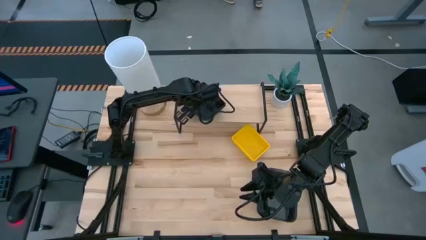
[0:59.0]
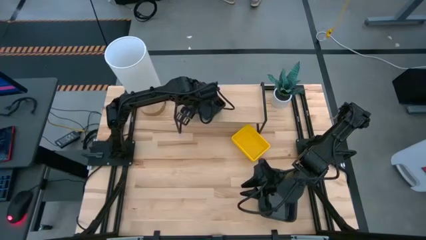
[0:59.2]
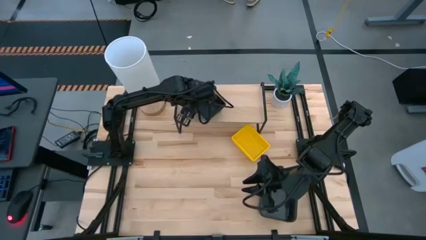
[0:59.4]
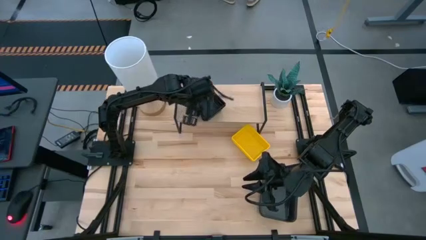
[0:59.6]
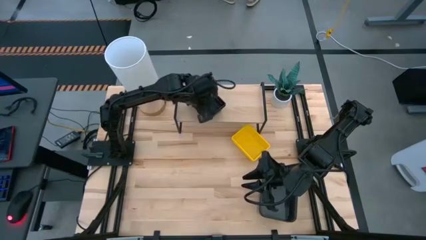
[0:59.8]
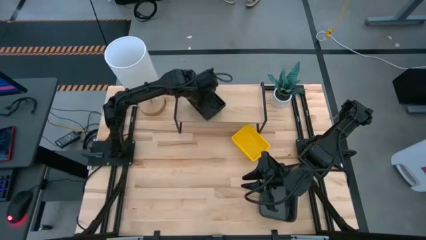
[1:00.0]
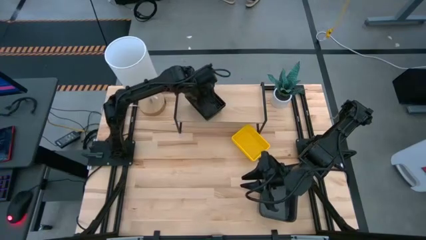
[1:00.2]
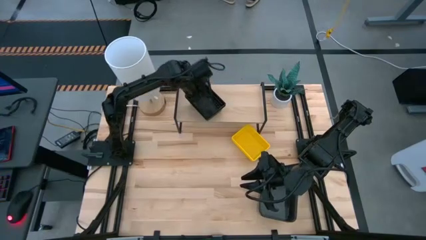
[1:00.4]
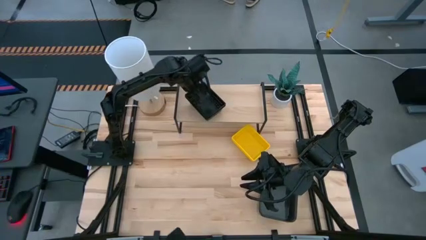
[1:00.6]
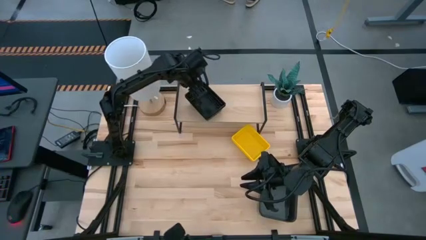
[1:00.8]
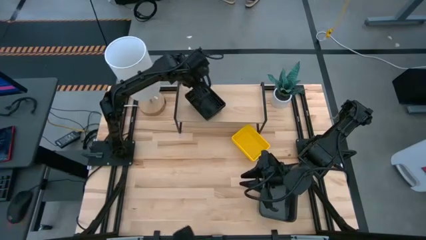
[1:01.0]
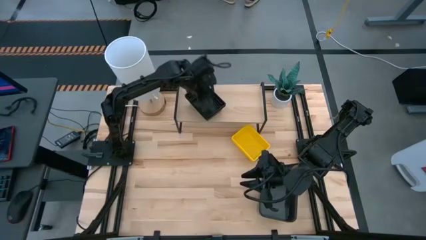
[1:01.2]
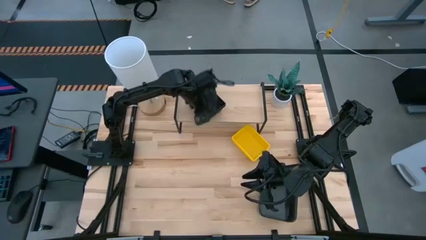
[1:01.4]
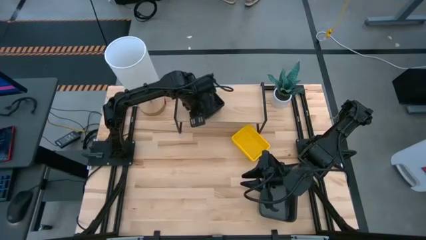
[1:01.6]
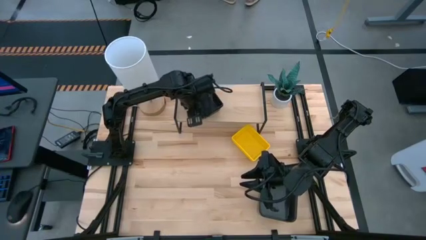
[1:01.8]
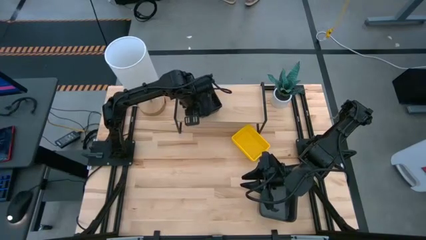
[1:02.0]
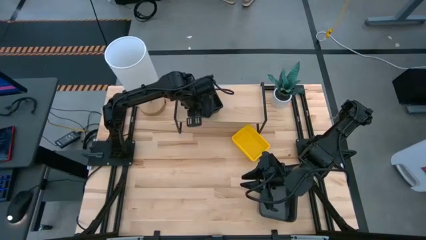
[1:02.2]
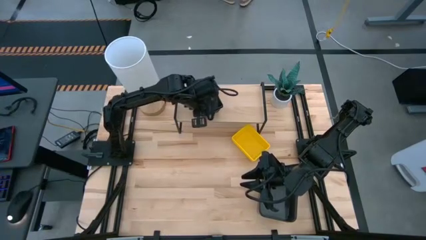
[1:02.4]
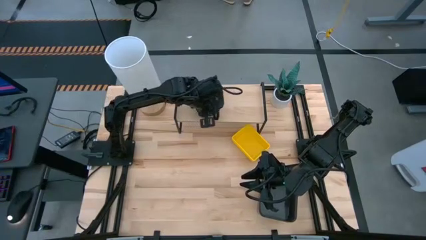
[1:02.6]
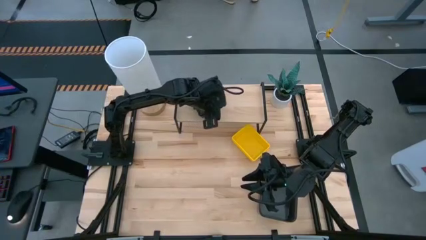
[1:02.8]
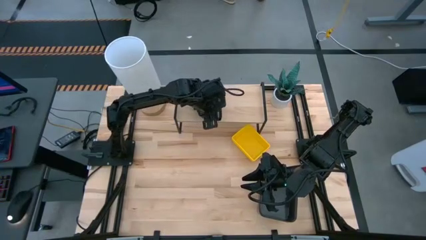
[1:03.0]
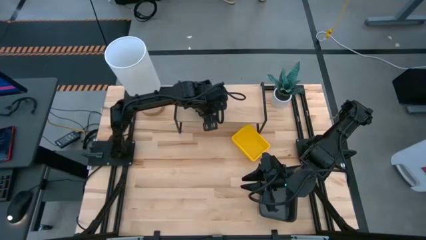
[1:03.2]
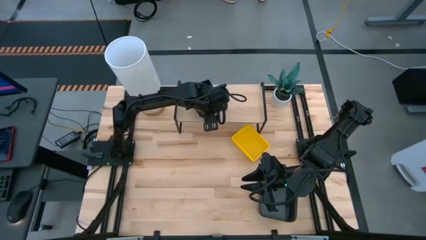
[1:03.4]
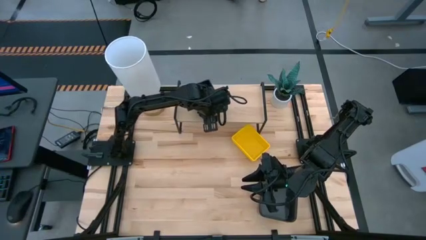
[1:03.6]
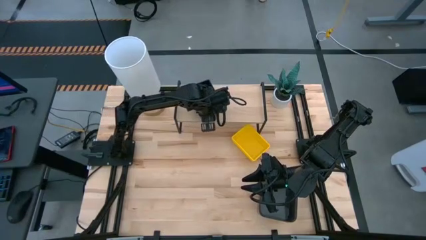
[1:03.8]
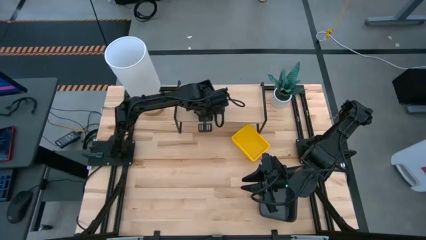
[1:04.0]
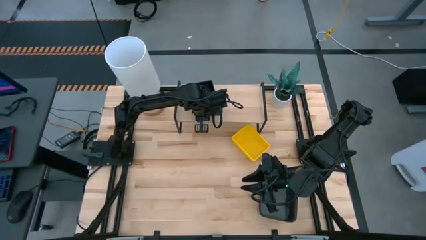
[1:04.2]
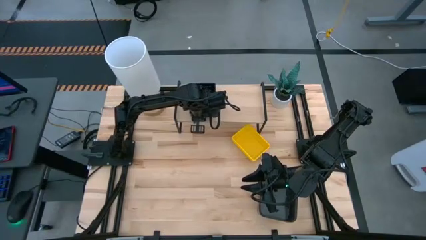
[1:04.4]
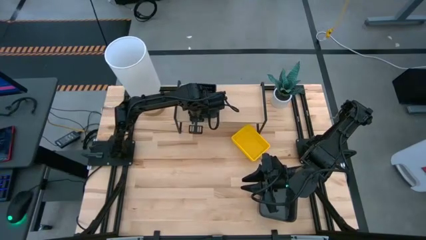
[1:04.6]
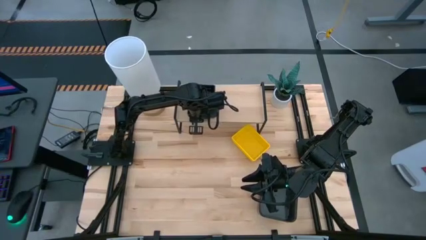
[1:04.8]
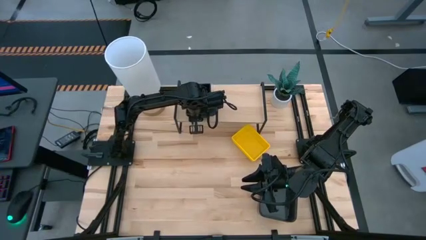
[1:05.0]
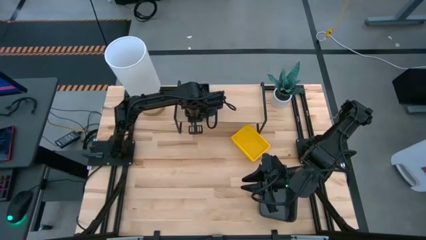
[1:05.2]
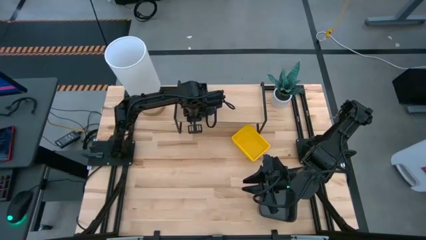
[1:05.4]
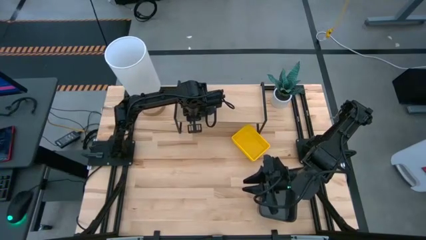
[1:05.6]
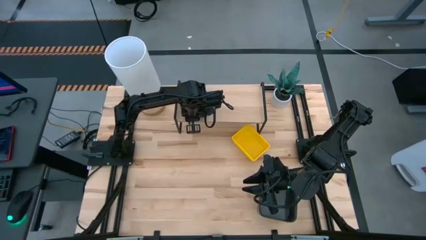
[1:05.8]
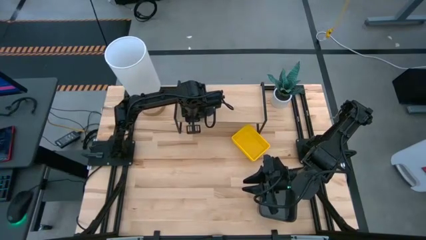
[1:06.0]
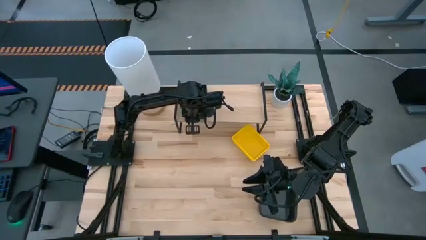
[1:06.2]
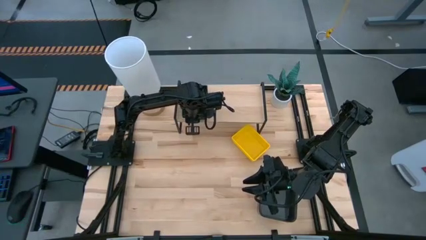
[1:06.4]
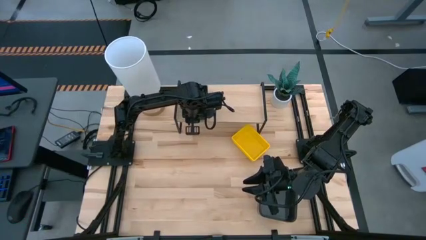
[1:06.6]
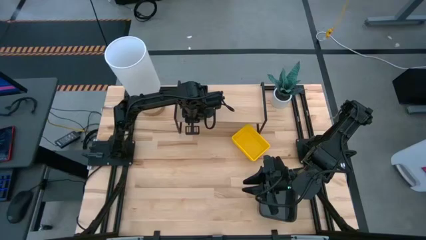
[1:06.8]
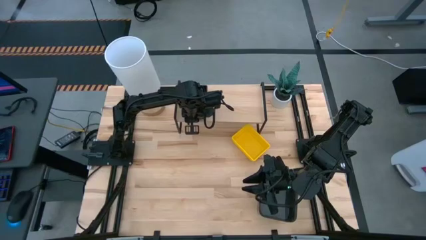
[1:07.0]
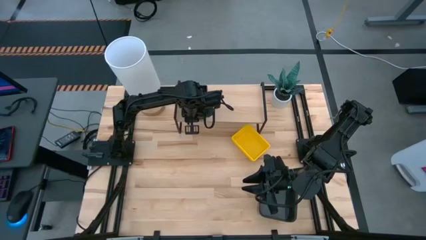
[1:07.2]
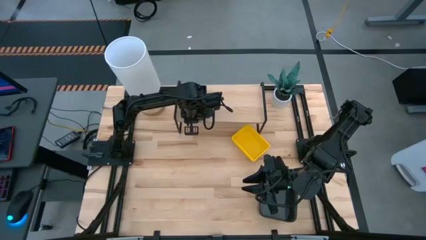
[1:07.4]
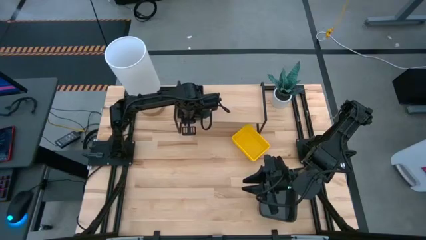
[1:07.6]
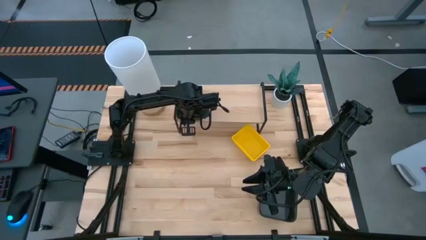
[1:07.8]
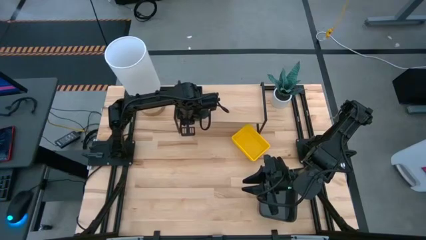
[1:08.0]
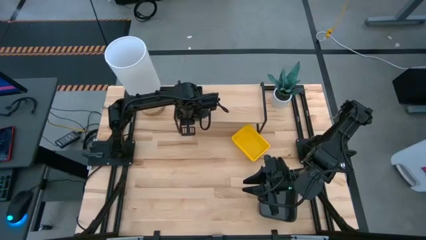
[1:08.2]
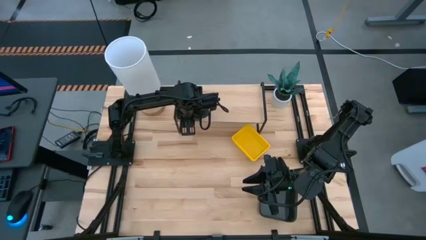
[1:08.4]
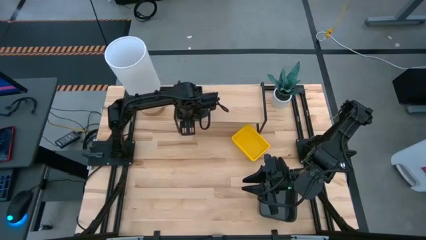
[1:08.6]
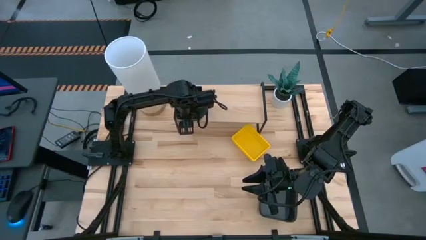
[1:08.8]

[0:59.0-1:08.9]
Task: Stack baskets on shelf by color
Put the stacked black bin on the shelf

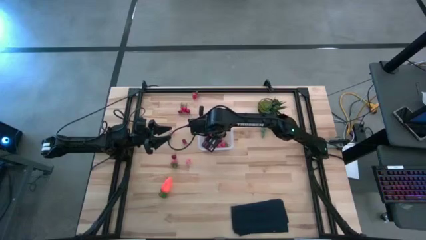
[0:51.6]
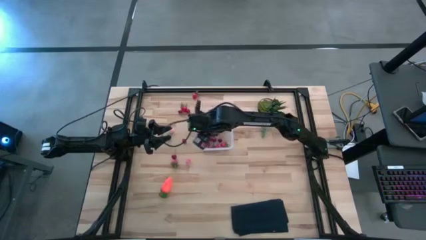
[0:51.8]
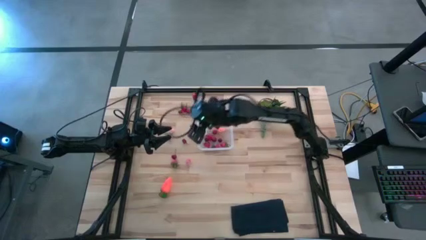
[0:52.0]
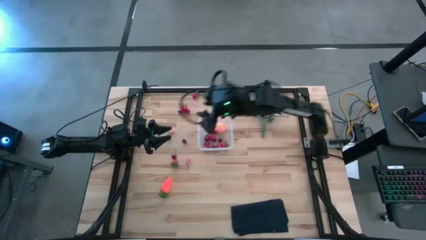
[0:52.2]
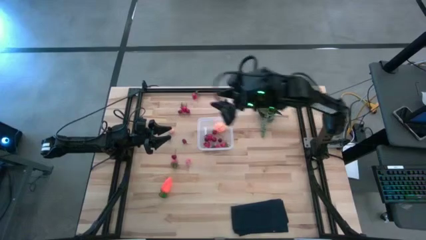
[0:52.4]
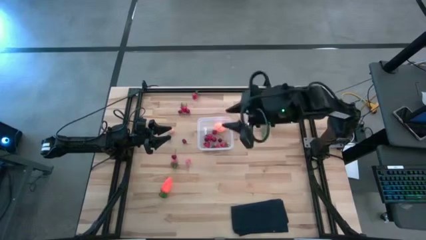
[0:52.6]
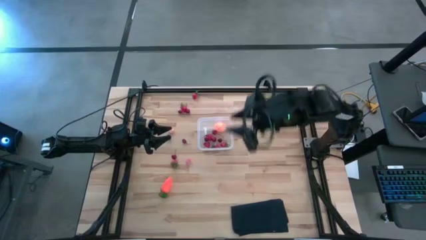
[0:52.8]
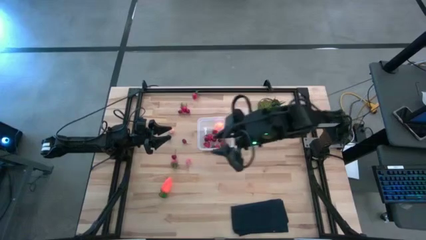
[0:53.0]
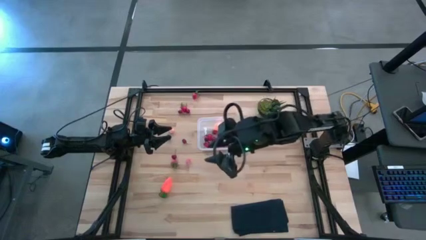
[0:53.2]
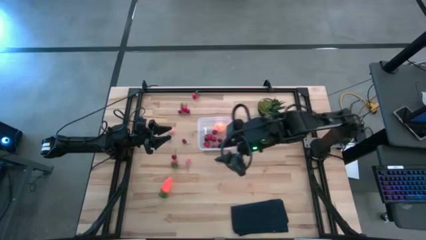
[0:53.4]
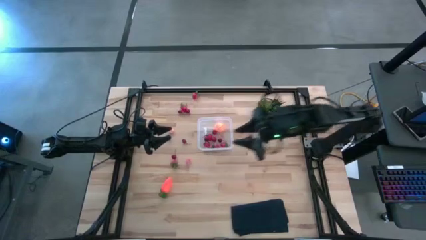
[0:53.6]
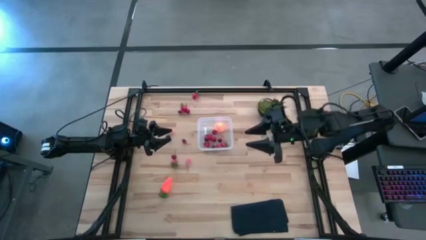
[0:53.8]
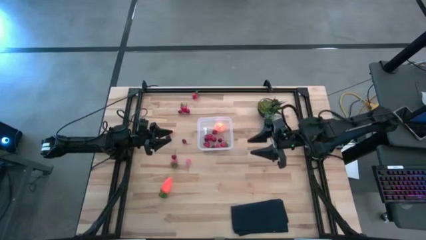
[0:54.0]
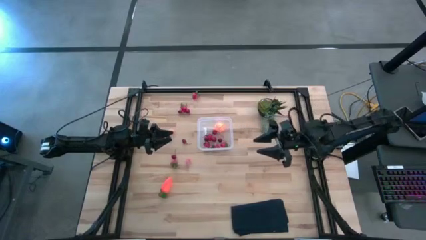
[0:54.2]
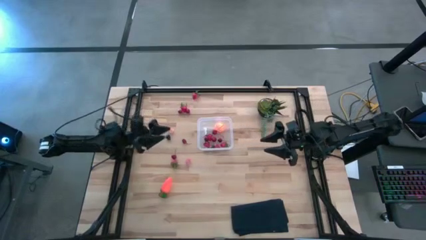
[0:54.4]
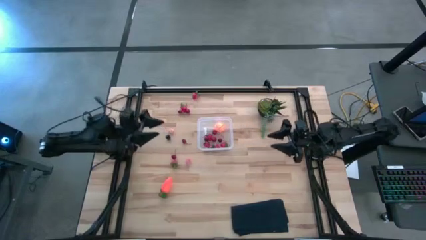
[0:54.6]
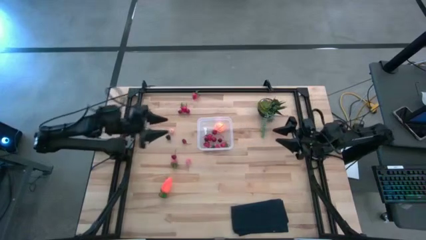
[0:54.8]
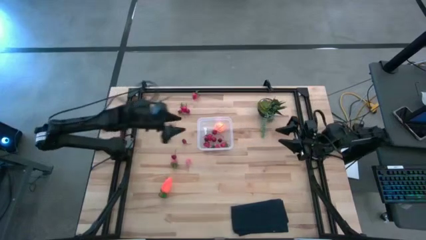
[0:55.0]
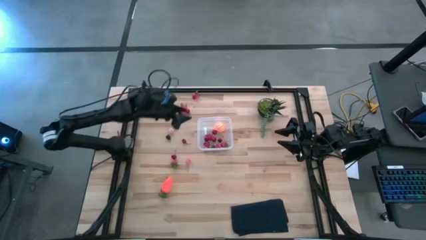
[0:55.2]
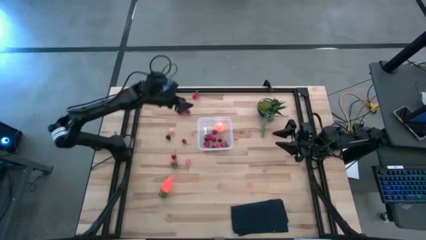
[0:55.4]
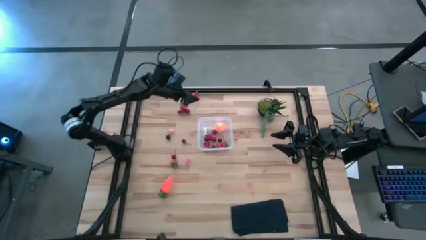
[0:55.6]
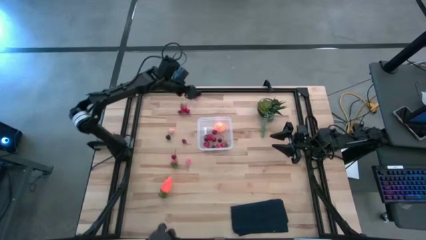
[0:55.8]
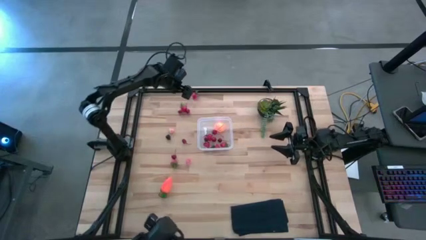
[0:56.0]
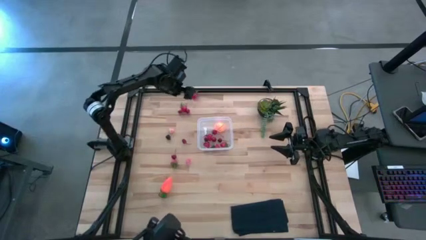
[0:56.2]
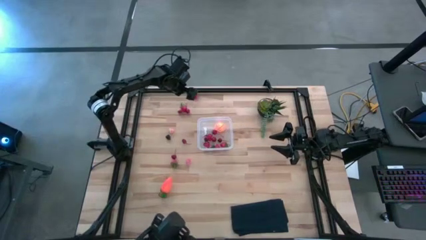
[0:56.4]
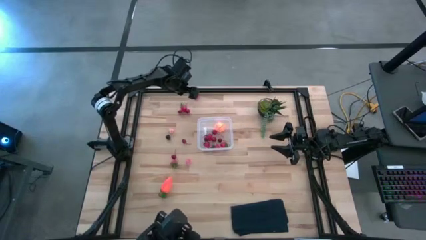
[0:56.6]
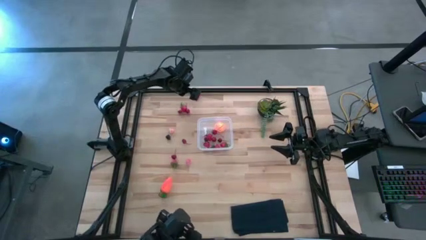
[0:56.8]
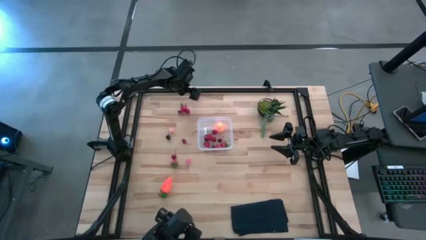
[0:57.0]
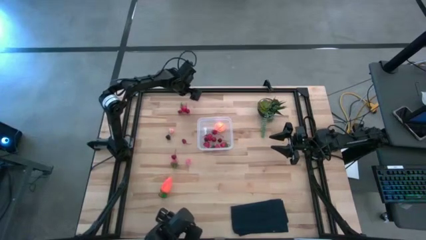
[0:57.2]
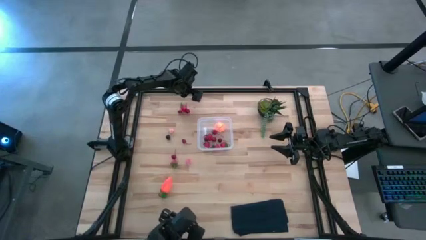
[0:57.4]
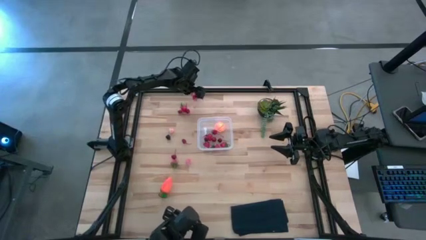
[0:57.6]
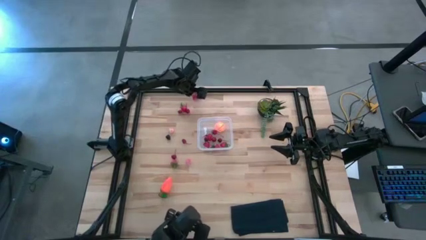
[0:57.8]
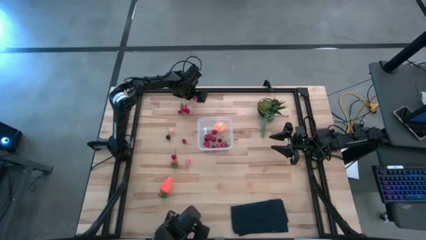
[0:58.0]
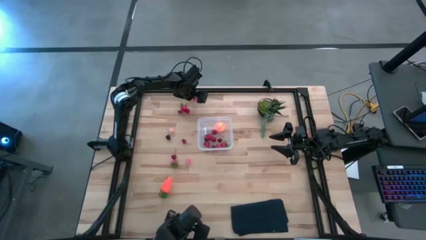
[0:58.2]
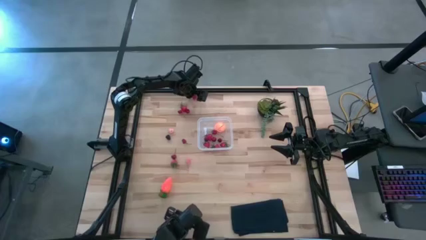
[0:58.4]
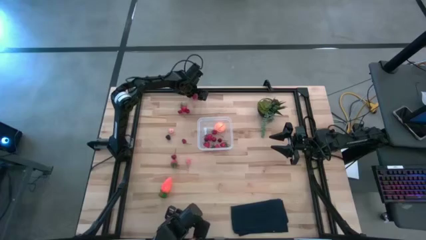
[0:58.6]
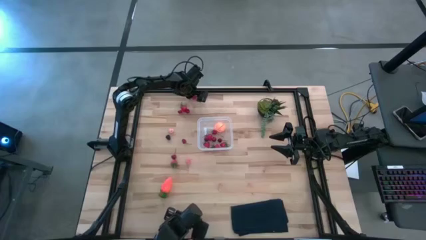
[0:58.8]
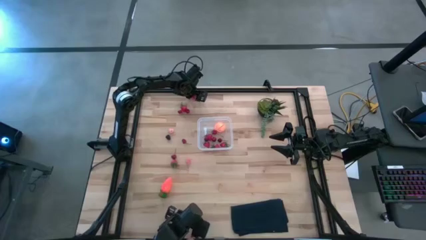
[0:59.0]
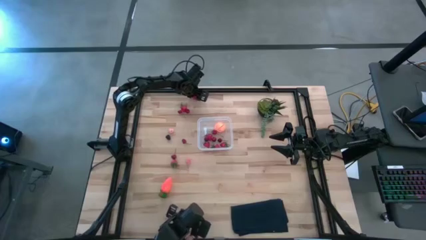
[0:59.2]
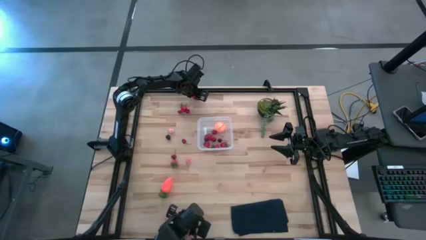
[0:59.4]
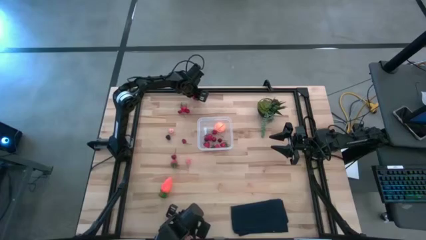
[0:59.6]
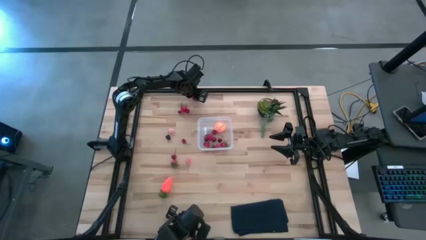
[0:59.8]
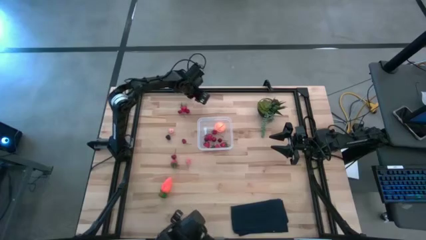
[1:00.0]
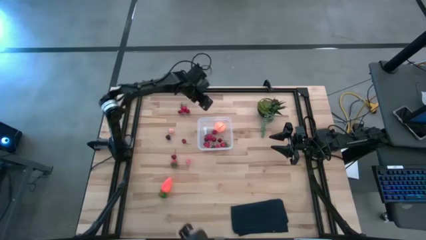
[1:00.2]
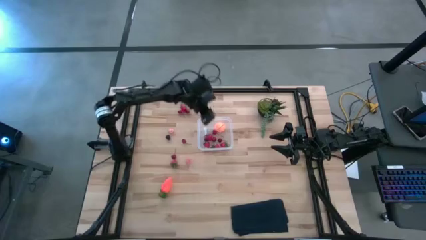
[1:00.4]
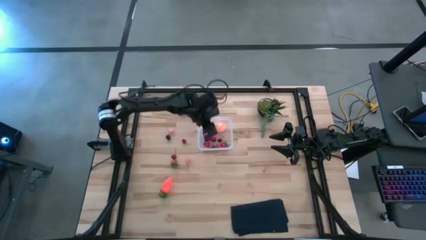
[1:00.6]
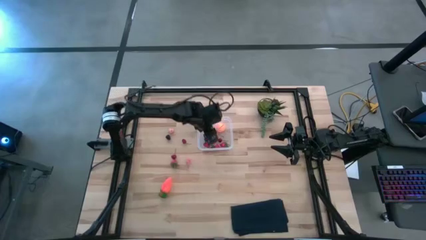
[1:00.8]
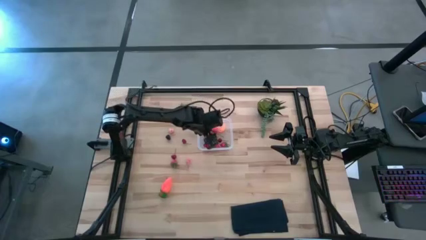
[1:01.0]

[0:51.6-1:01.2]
Task: Pick and placing Produce into tupperware
Put the strawberry into the transparent bin
